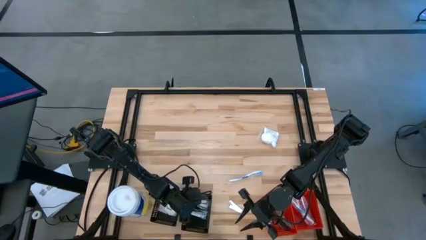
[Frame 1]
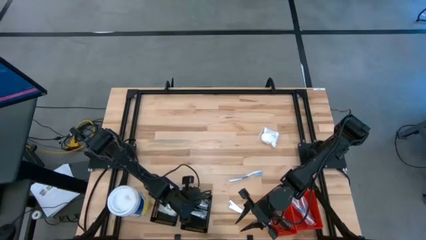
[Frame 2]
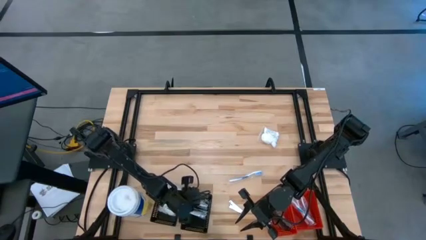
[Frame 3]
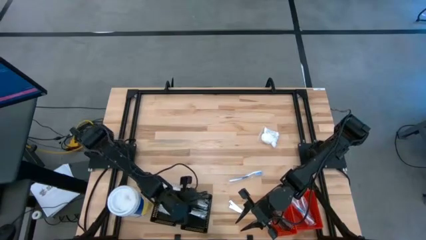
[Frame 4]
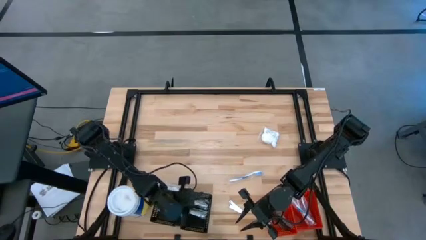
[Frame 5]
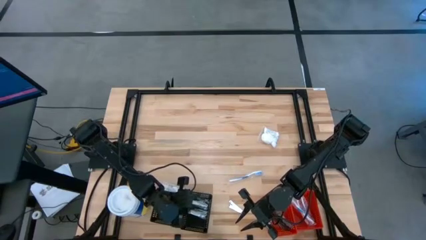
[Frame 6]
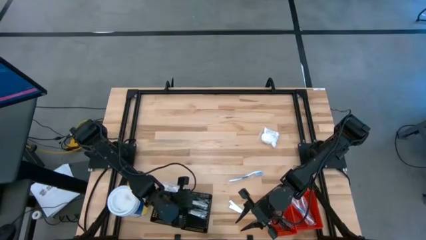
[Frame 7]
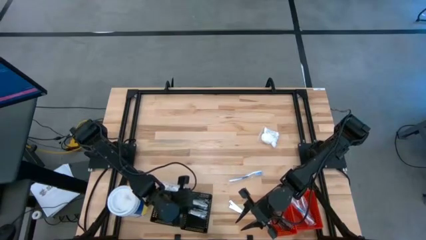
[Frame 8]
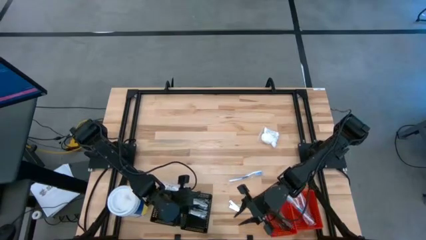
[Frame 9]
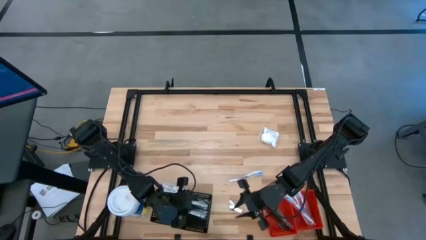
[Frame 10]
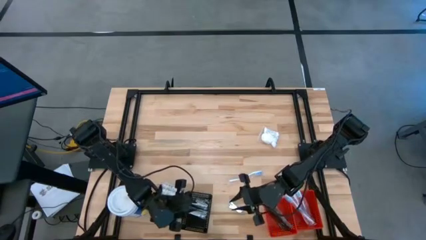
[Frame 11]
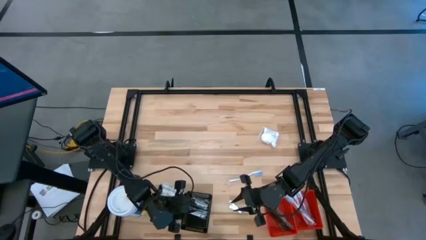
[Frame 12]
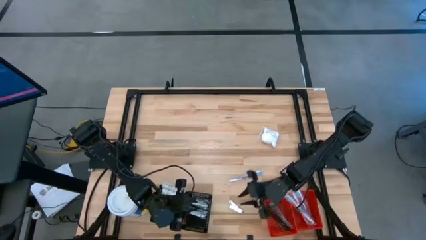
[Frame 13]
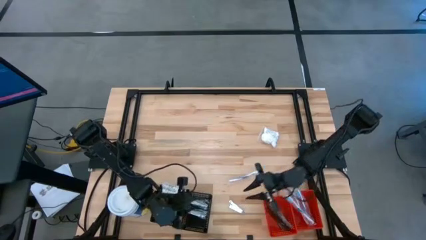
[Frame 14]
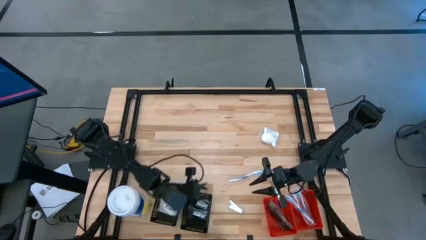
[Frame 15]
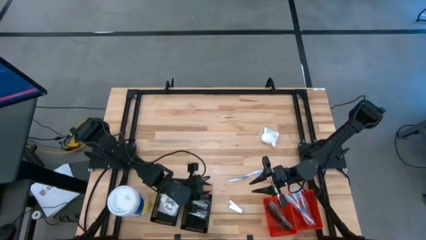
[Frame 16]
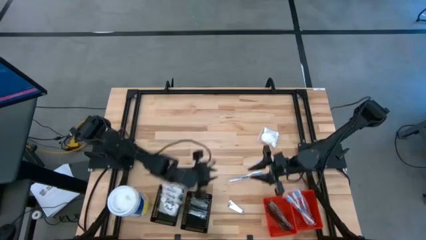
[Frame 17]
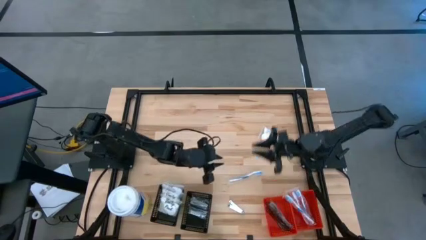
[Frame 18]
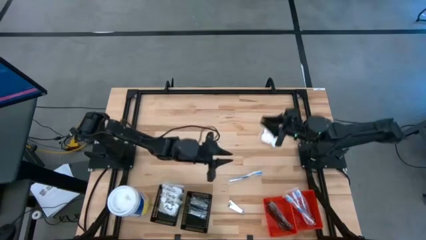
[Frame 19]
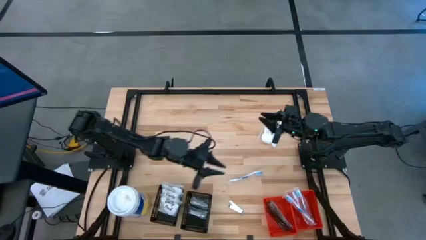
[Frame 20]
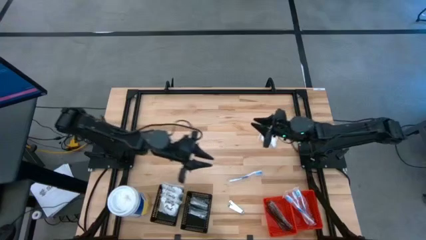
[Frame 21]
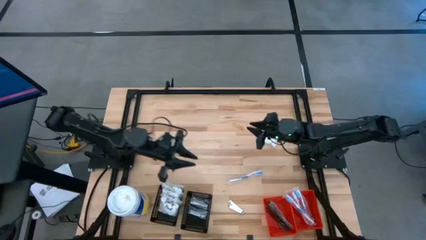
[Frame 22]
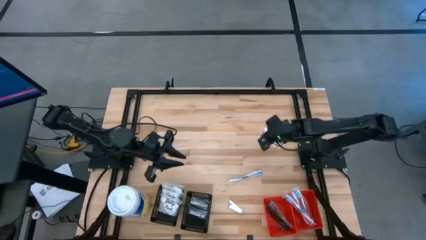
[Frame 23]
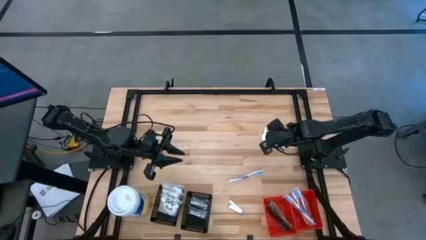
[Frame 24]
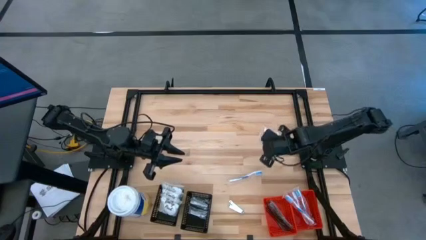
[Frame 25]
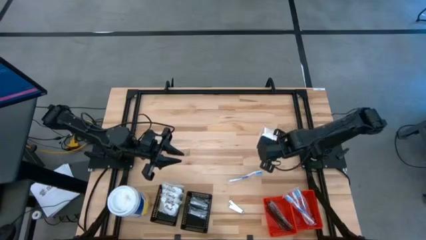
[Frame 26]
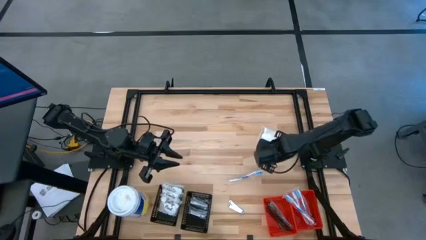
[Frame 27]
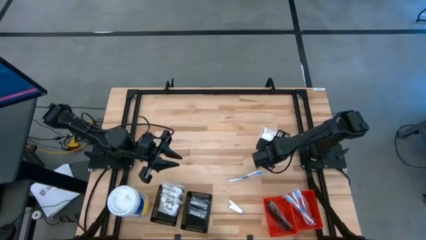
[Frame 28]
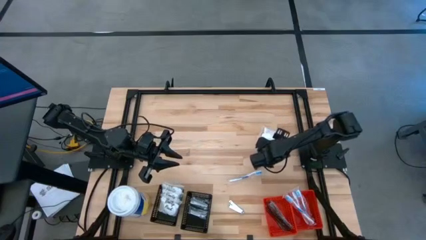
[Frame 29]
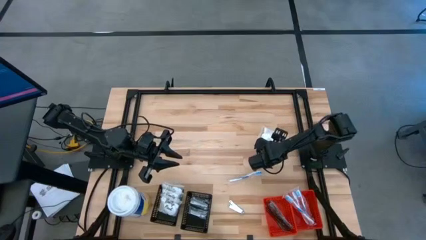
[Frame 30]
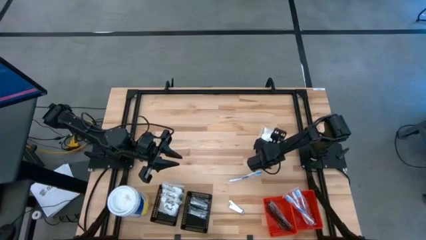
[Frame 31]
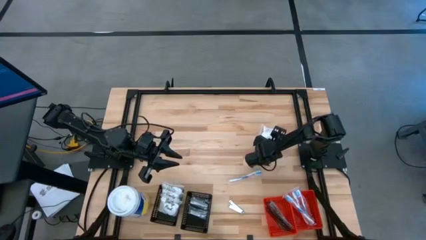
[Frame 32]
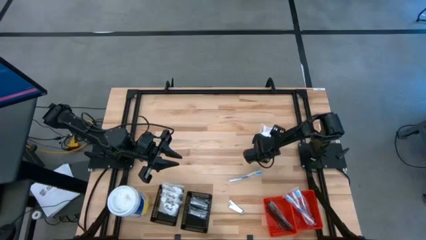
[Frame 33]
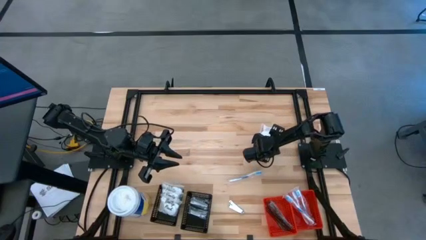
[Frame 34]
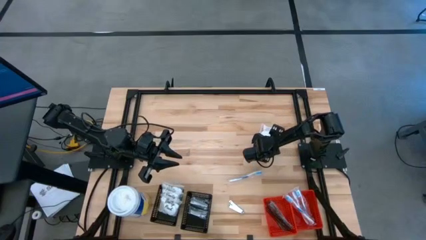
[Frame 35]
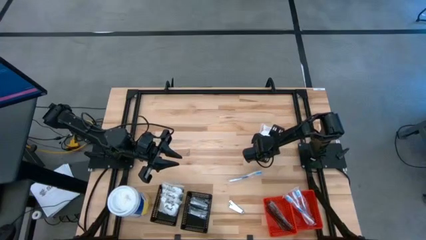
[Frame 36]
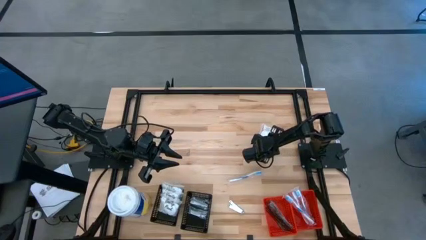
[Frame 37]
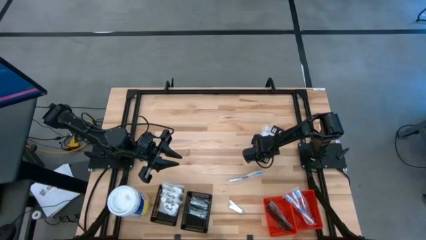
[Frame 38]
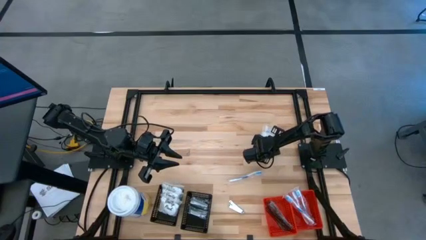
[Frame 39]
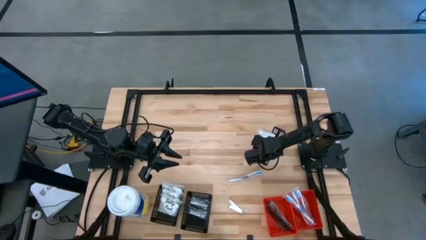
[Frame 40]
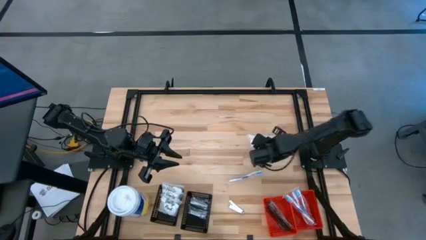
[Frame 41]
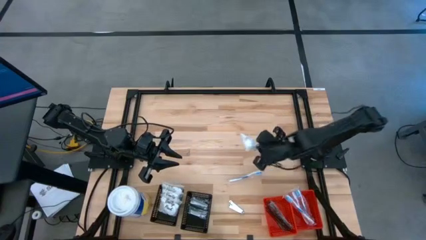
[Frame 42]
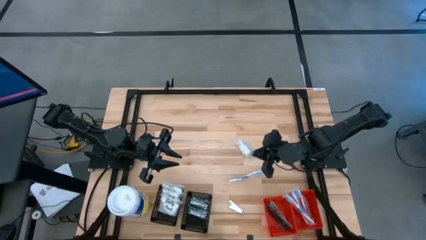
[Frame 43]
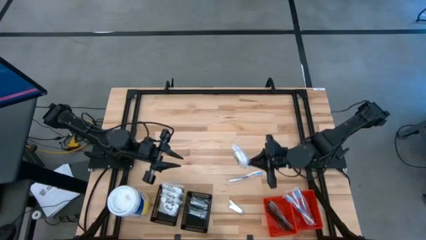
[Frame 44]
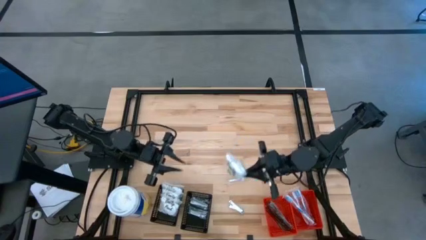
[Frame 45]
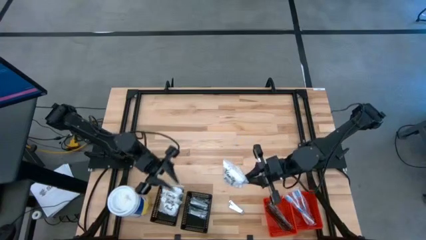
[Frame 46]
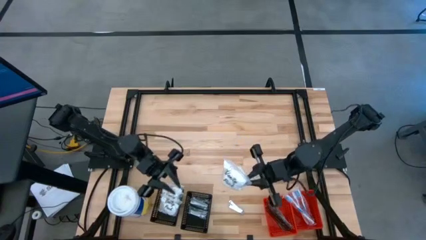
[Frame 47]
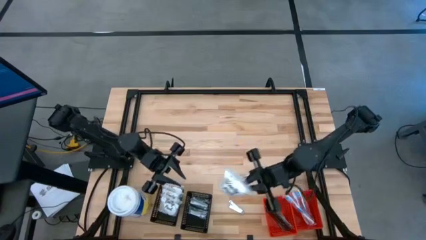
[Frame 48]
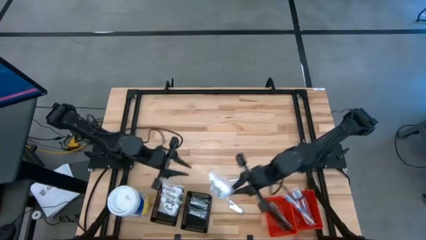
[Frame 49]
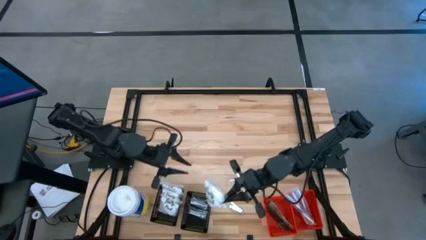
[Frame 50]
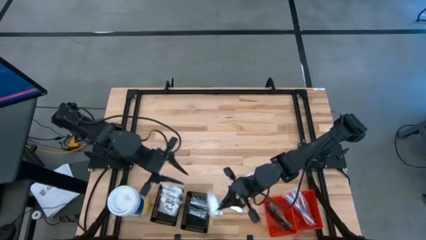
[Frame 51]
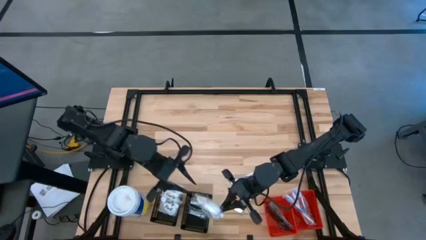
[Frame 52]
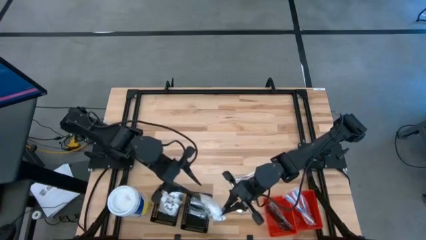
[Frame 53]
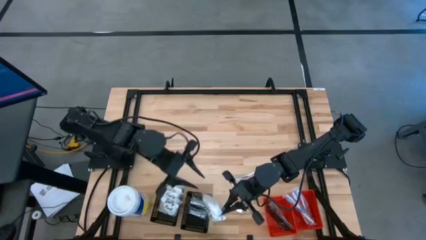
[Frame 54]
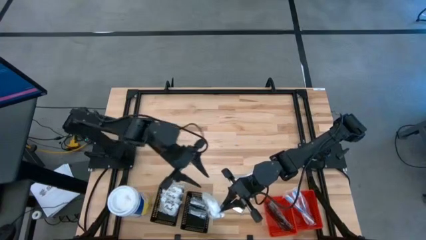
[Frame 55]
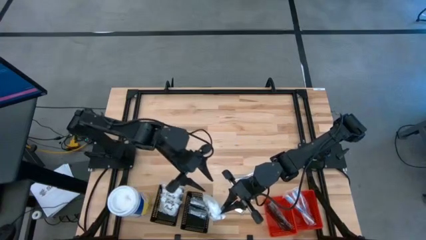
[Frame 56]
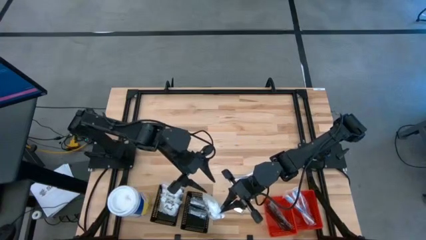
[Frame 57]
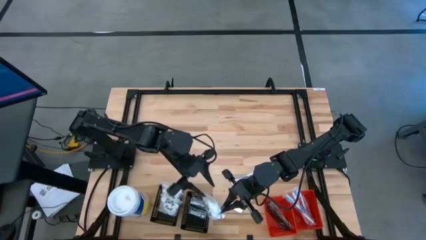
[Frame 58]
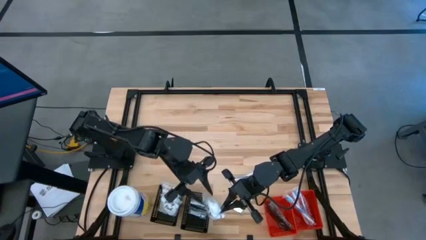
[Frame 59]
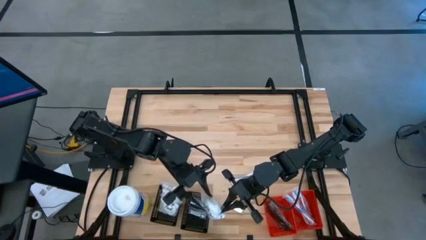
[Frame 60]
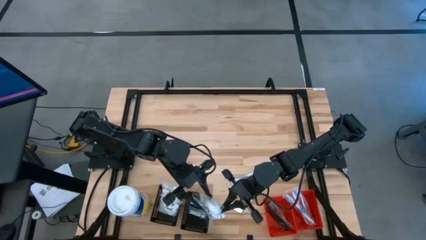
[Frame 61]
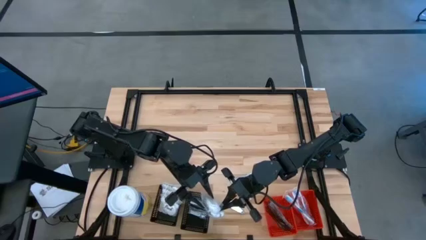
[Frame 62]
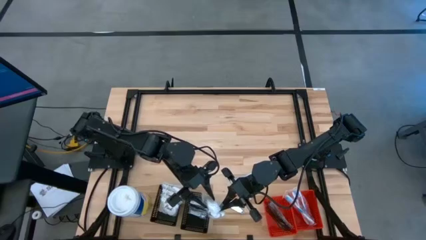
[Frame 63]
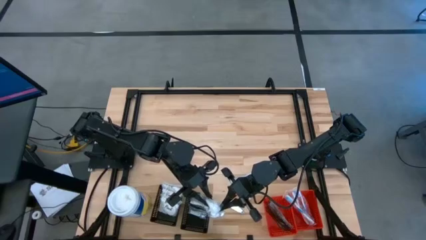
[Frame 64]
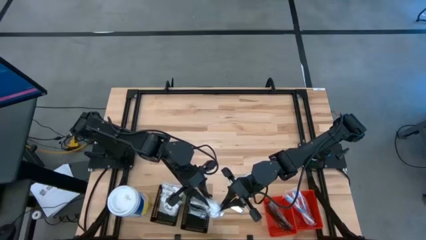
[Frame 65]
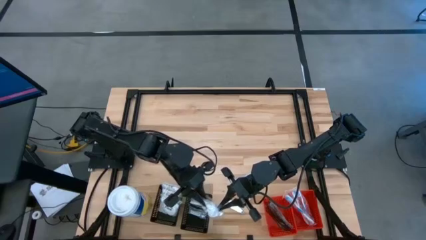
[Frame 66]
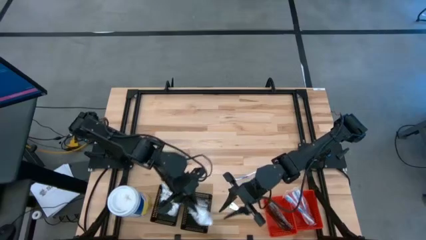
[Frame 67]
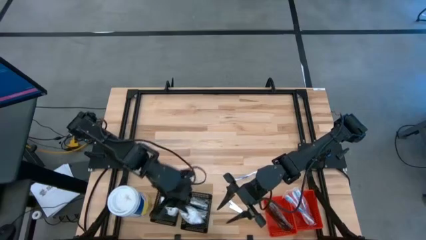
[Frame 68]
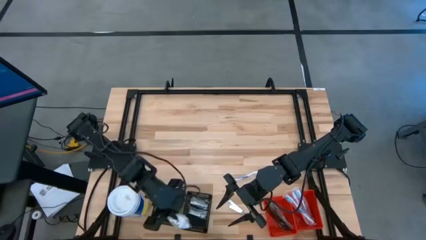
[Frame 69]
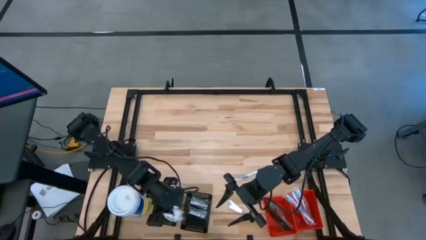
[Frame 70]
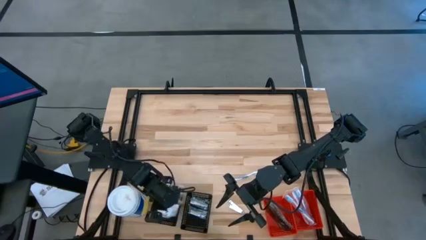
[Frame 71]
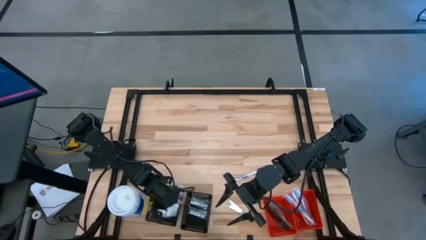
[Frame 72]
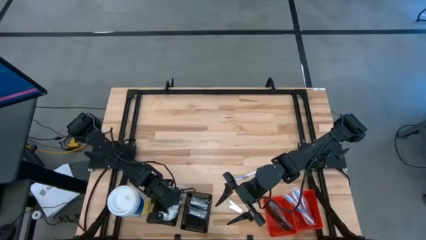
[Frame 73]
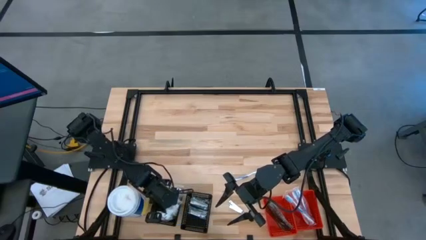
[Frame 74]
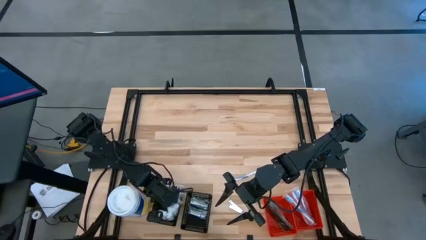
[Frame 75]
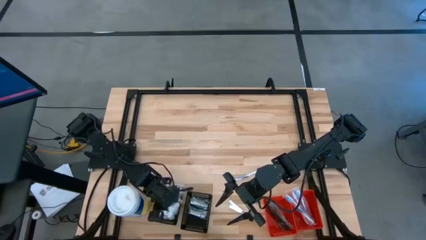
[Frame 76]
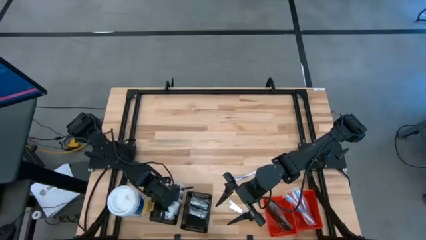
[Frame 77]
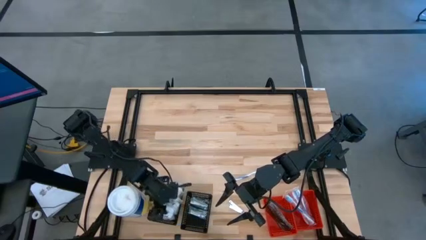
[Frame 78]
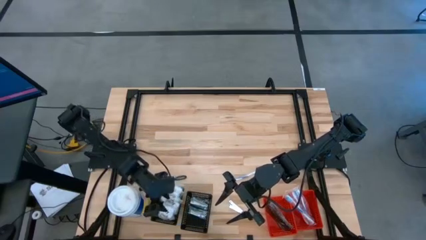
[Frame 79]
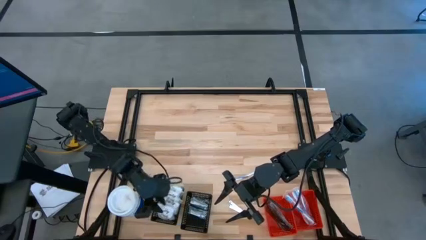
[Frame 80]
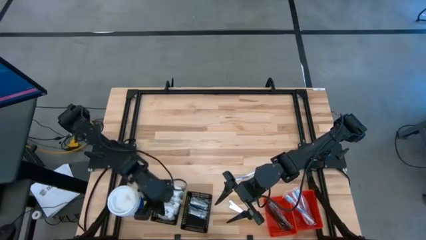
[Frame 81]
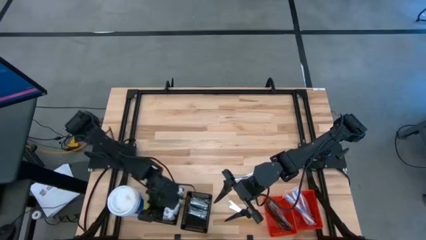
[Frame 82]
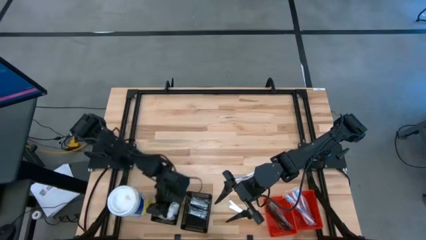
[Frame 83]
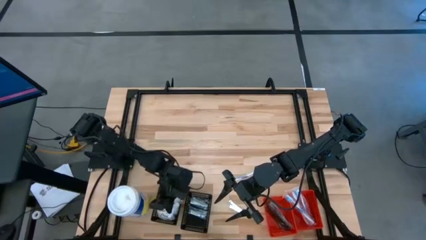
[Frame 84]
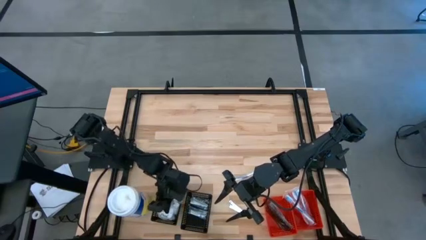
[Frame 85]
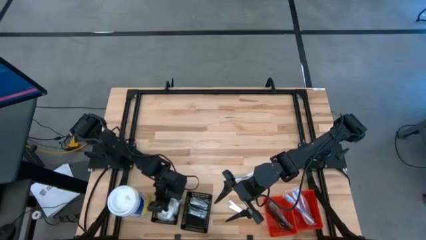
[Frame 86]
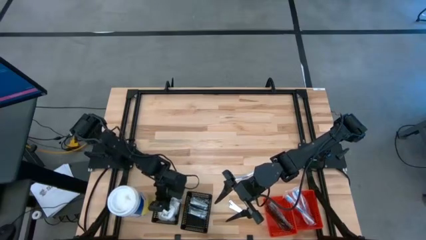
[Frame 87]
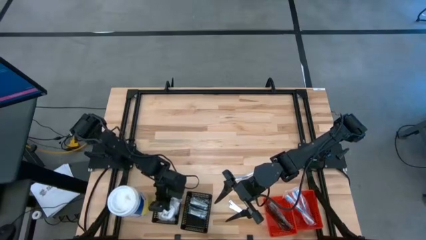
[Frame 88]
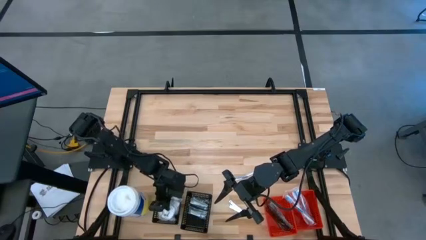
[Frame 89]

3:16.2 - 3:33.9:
Task: Pick & Place Travel size toiletries
Put the cotton pack into the left black bin
